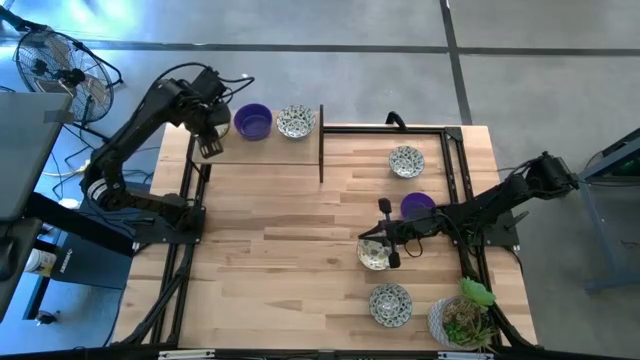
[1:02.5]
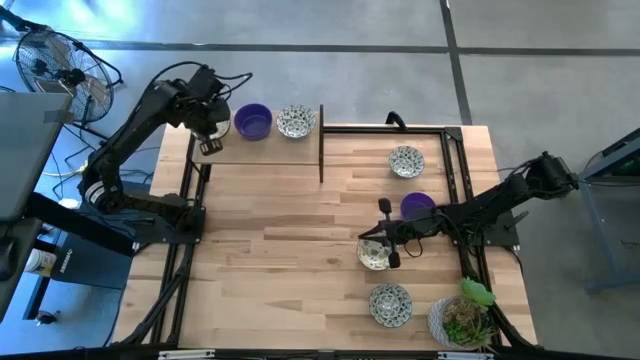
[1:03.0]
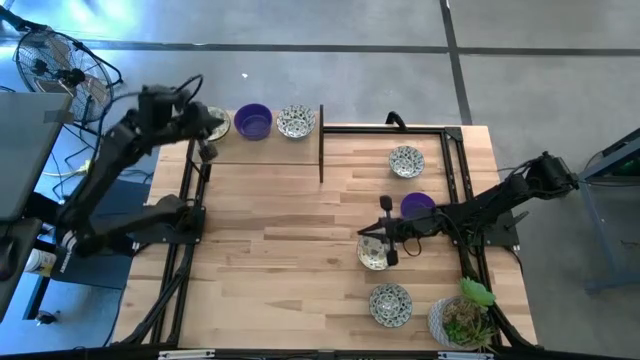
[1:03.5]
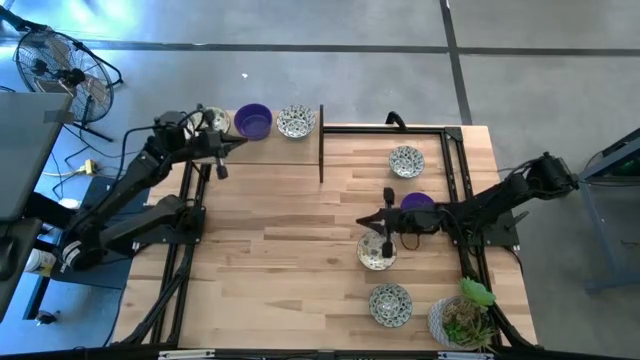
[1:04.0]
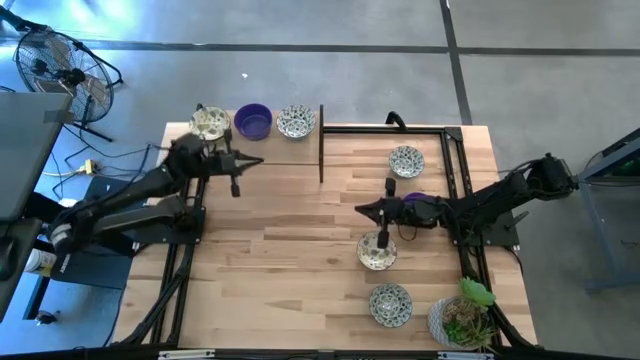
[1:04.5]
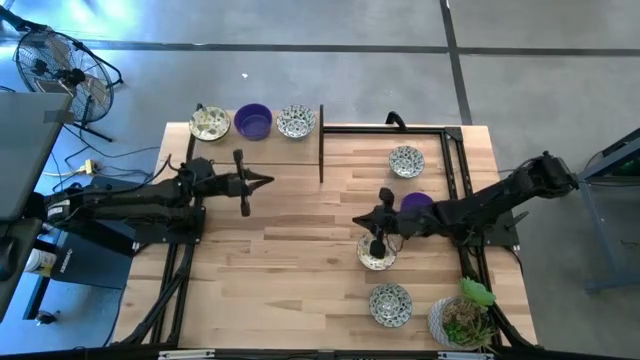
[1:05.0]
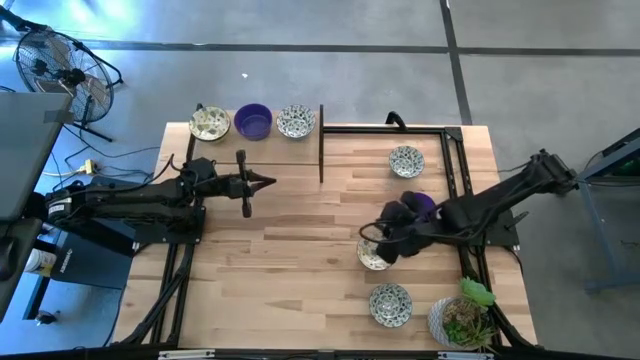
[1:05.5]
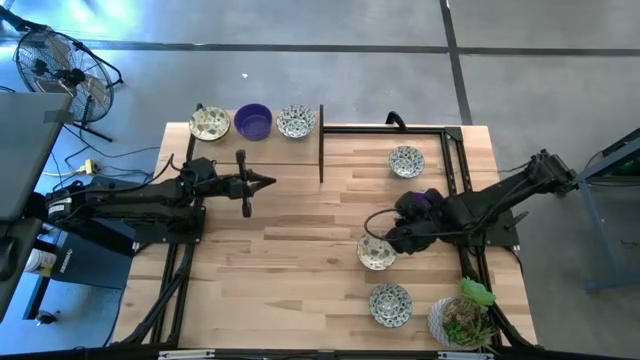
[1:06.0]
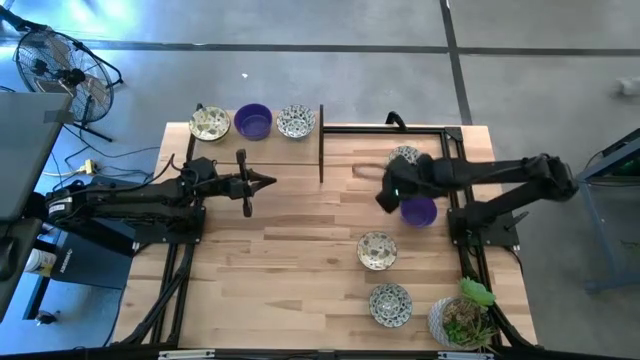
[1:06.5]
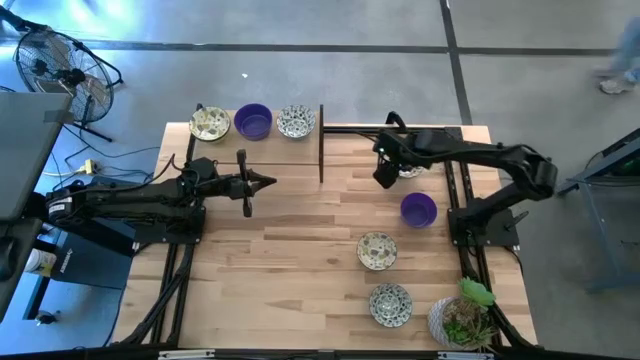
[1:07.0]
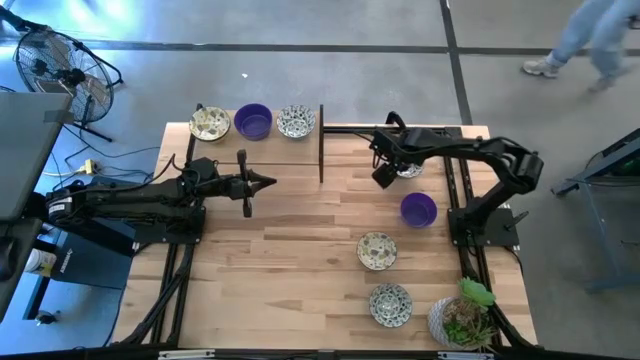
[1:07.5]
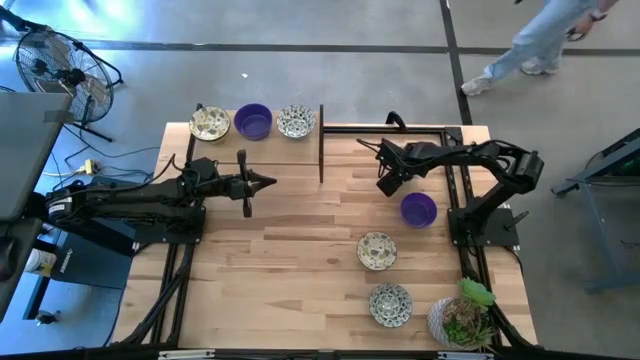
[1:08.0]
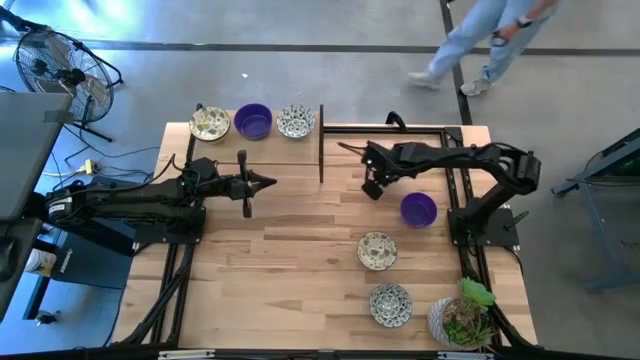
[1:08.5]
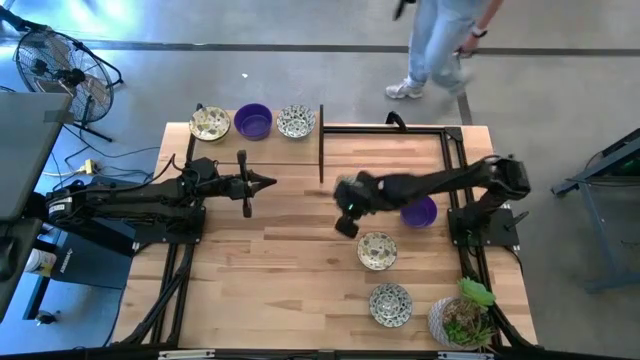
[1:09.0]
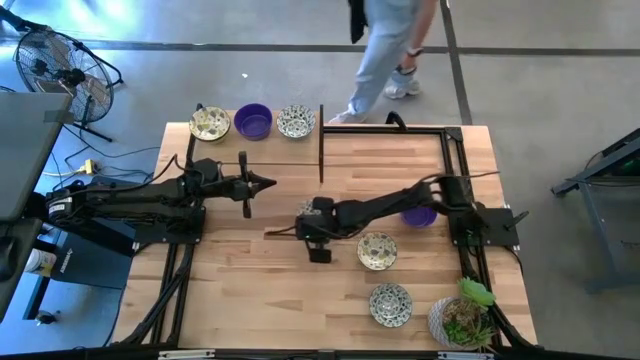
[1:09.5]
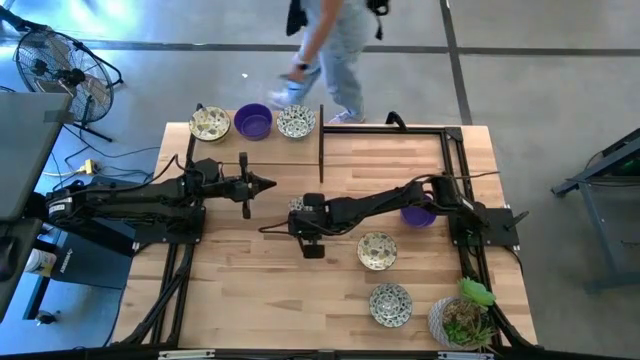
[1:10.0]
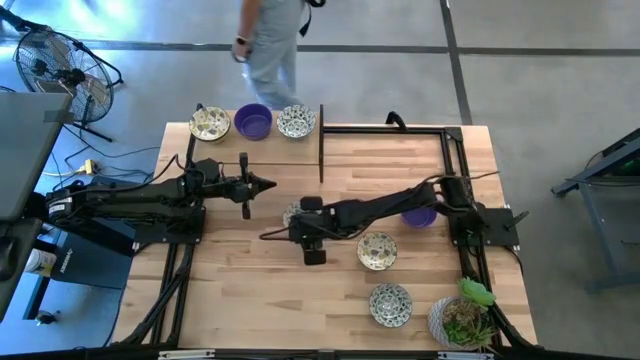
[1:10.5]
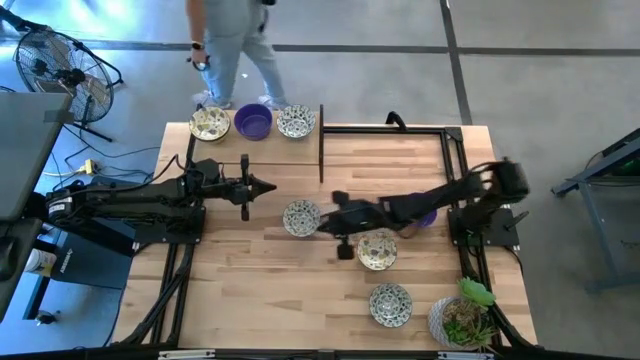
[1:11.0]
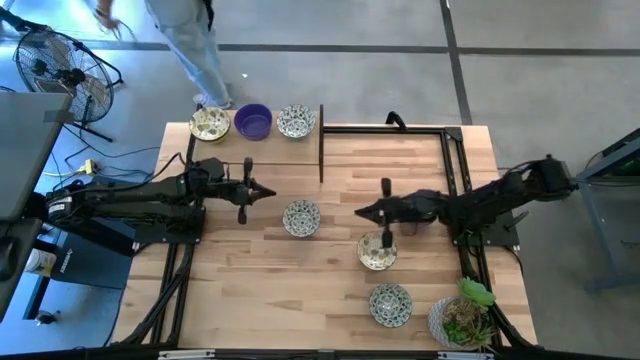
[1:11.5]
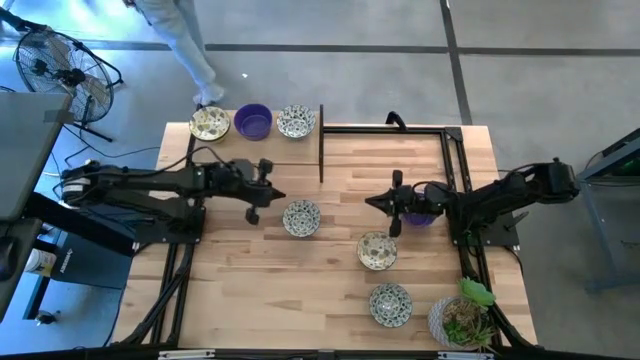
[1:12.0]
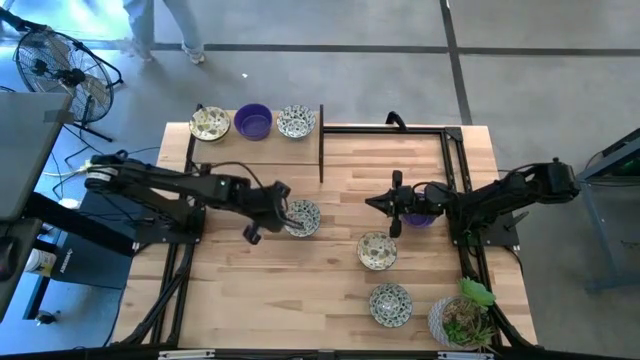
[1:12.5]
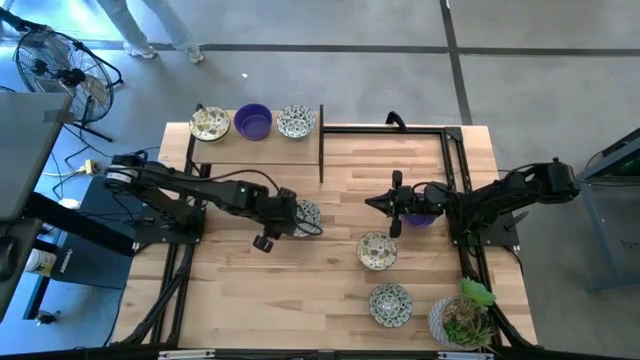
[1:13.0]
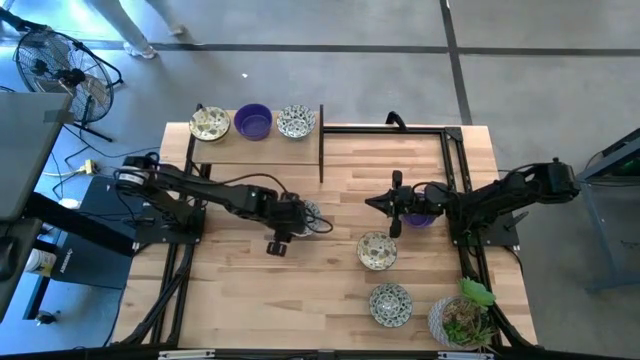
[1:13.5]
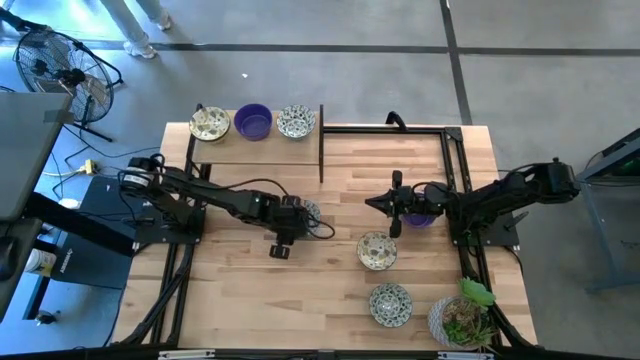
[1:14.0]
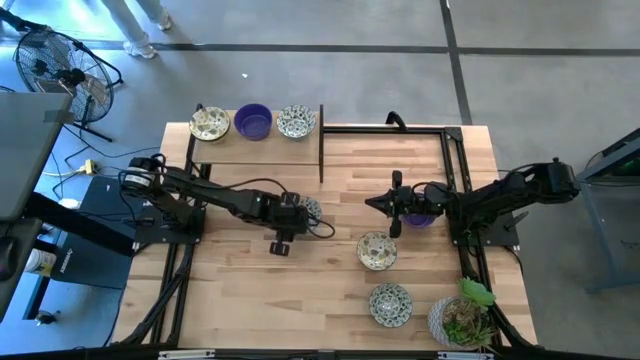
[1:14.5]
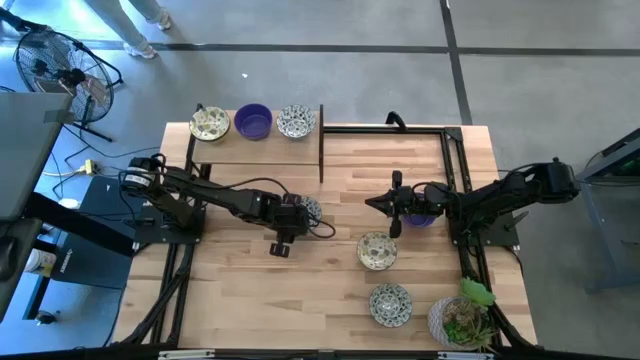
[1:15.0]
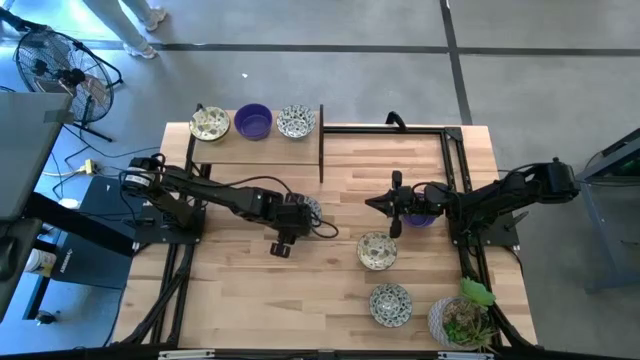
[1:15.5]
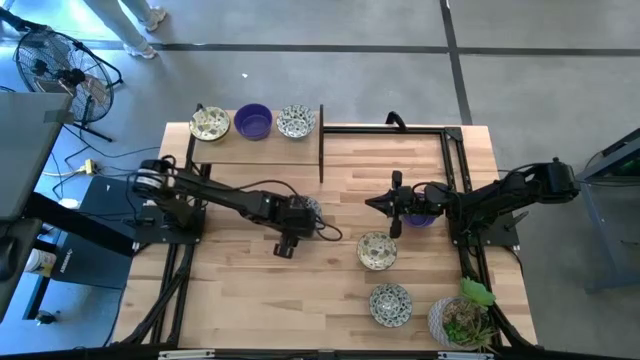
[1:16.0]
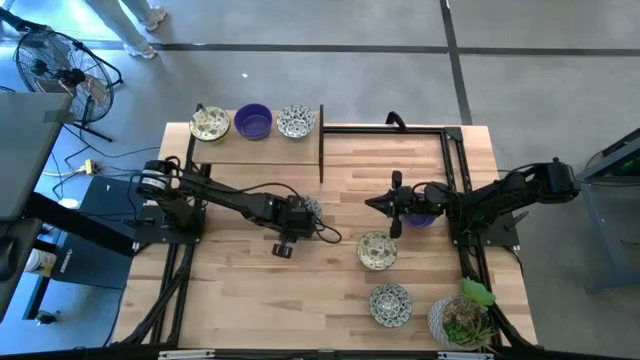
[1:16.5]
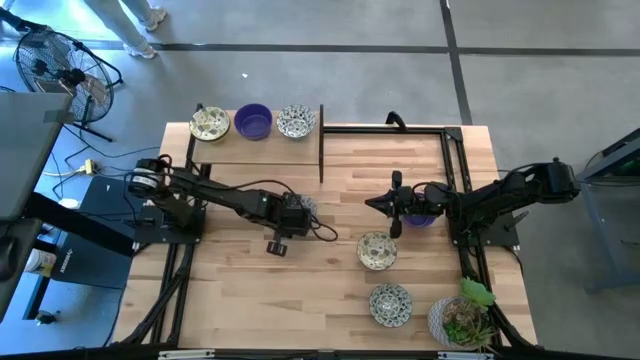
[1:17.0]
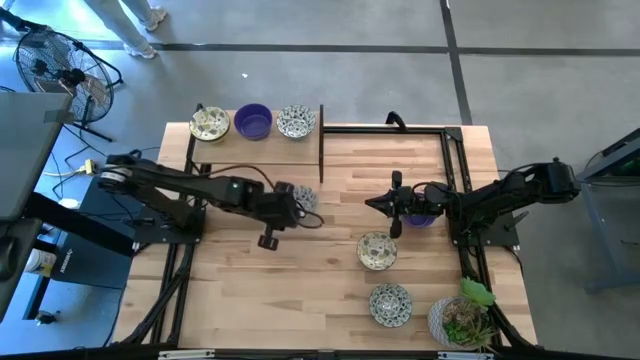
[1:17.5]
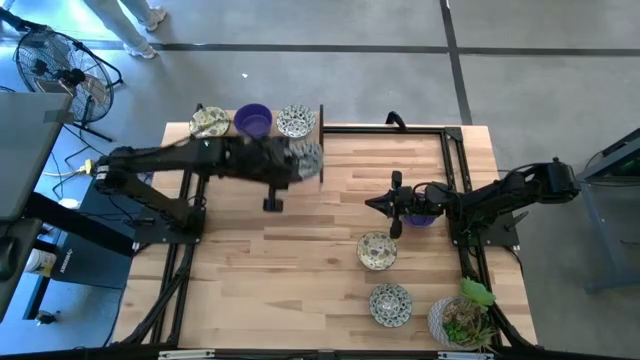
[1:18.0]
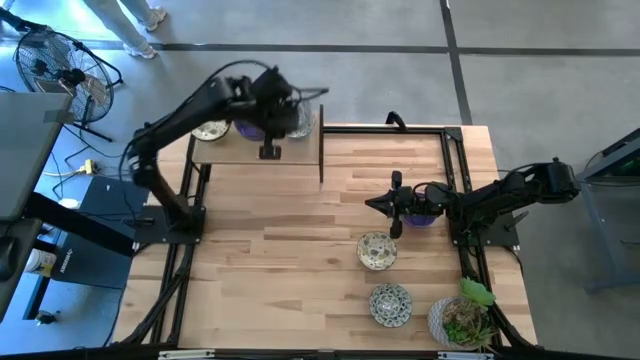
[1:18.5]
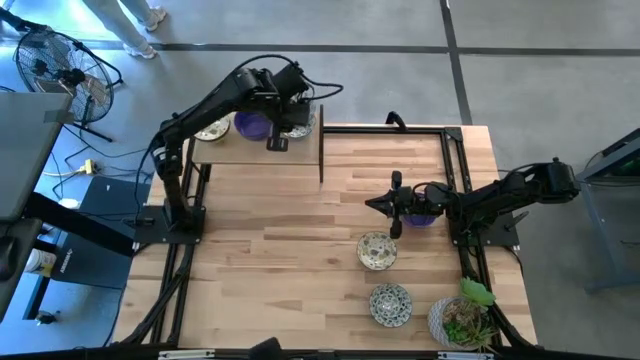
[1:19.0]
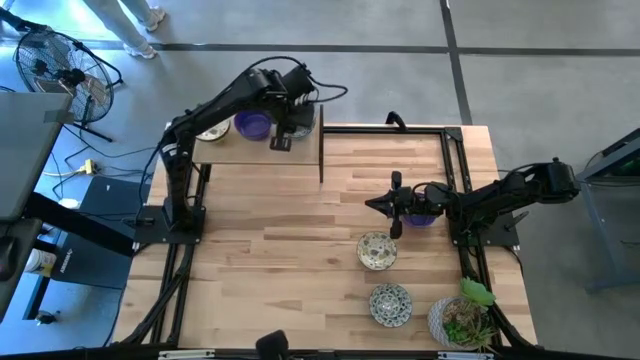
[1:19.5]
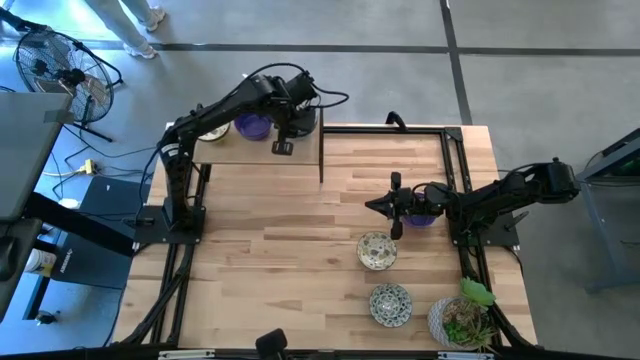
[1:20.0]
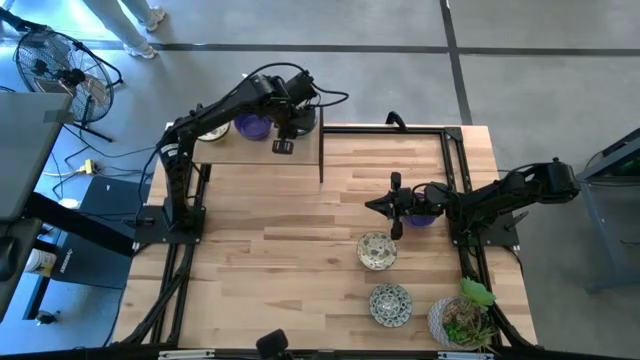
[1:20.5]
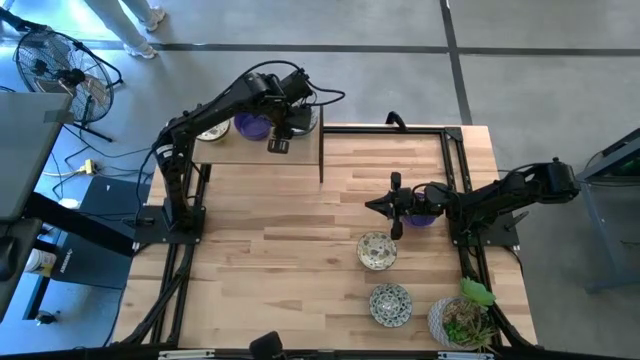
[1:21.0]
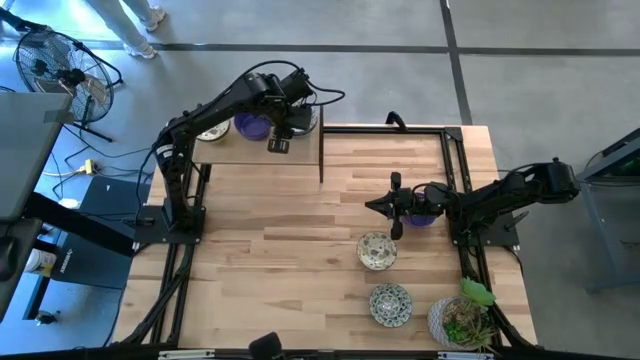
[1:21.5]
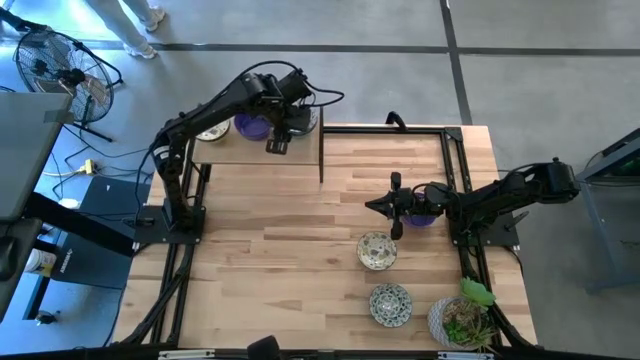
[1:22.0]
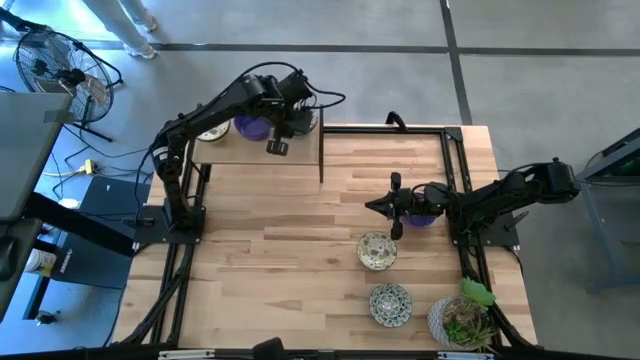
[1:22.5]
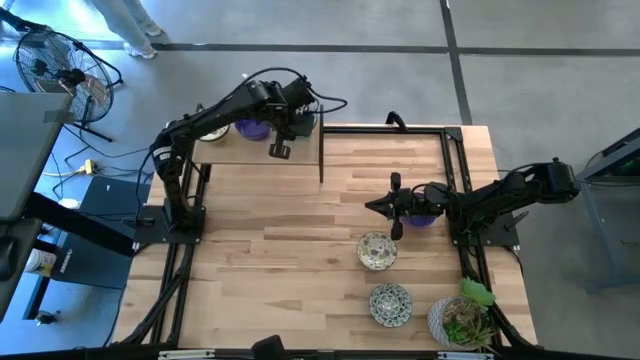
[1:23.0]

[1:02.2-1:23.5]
Task: Pick & Place Mini bowls
Stack the top blue and white patterned bowl on the blue and white patterned bowl on the shelf
